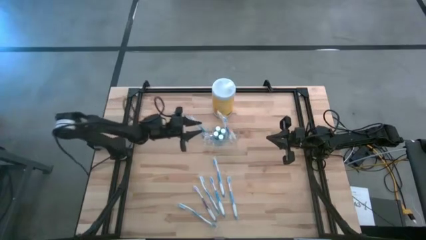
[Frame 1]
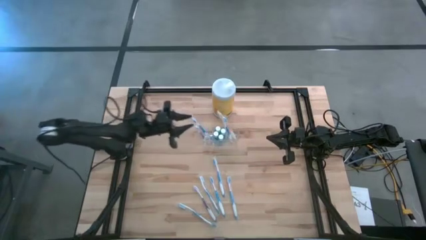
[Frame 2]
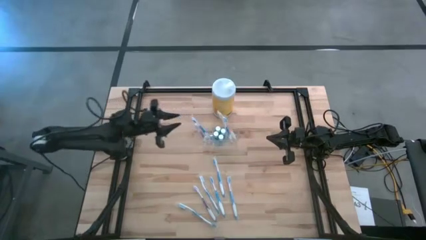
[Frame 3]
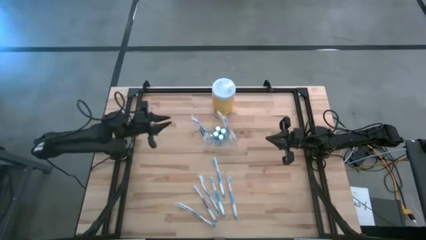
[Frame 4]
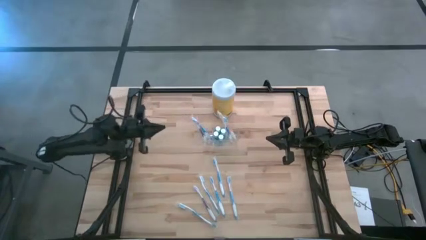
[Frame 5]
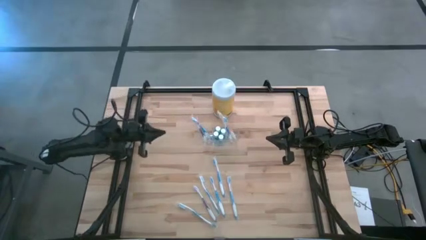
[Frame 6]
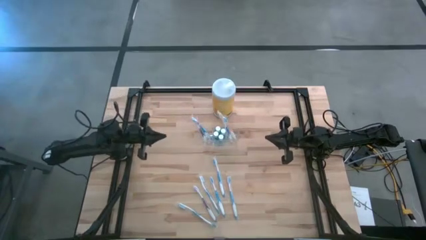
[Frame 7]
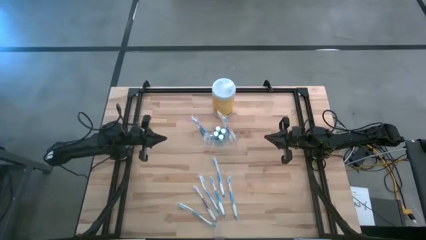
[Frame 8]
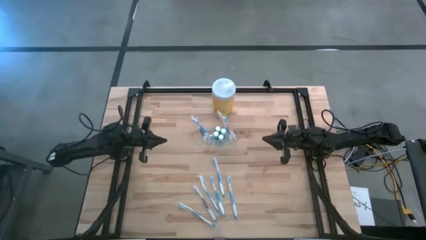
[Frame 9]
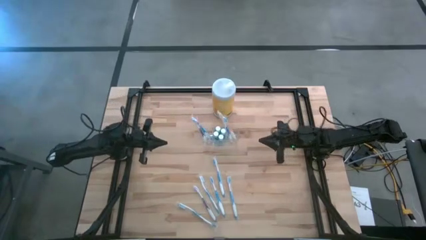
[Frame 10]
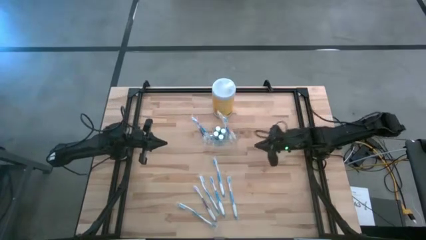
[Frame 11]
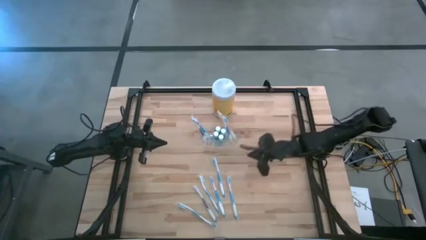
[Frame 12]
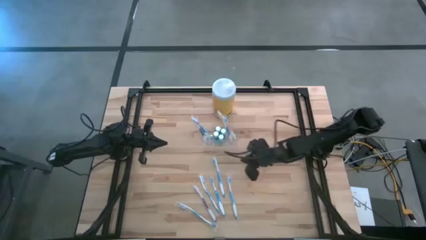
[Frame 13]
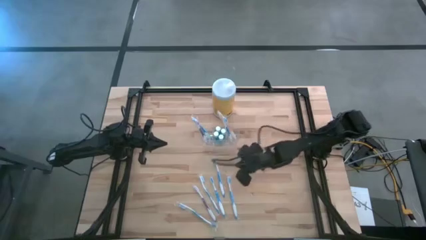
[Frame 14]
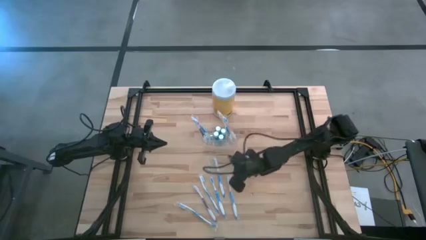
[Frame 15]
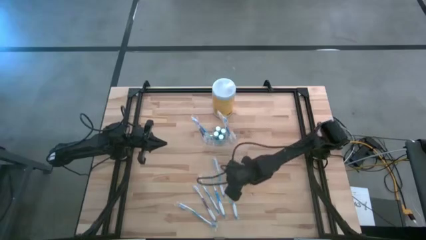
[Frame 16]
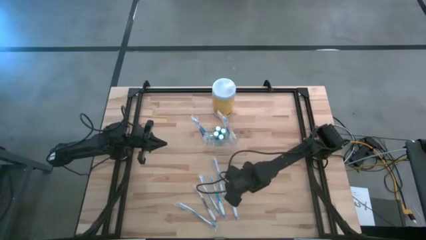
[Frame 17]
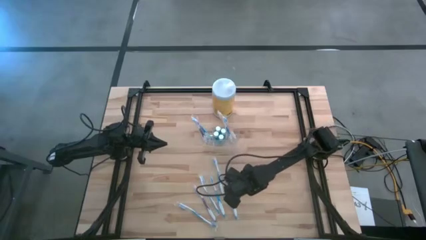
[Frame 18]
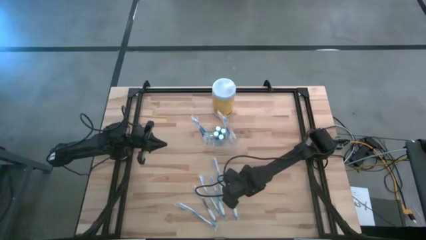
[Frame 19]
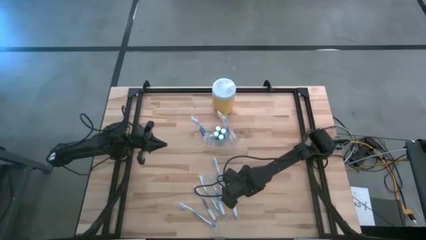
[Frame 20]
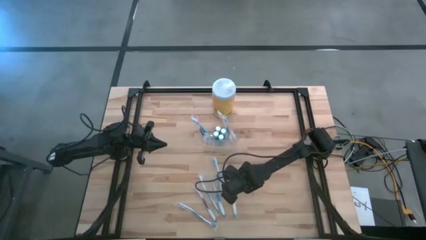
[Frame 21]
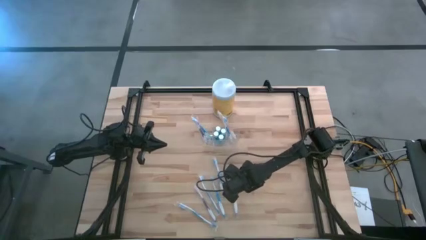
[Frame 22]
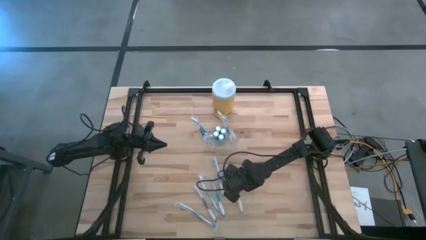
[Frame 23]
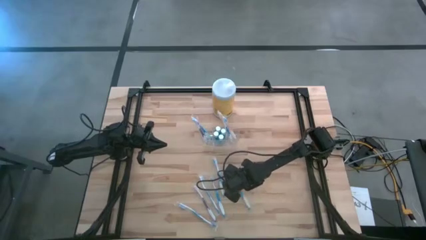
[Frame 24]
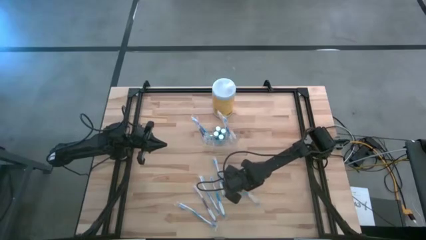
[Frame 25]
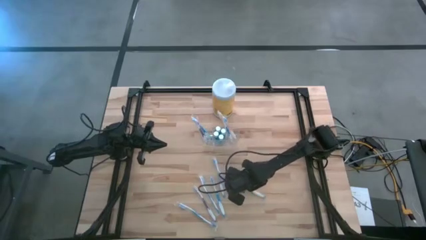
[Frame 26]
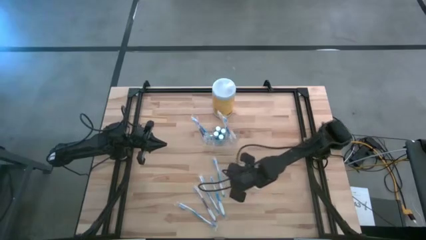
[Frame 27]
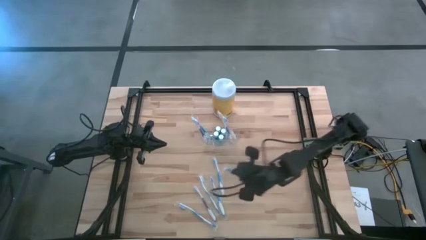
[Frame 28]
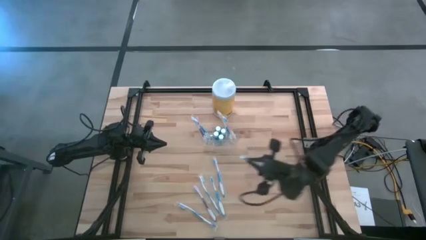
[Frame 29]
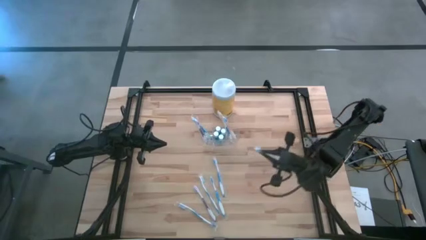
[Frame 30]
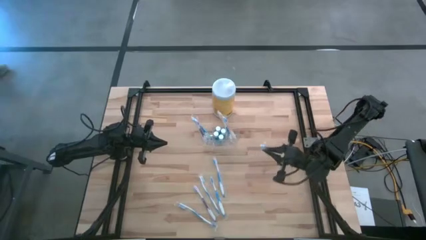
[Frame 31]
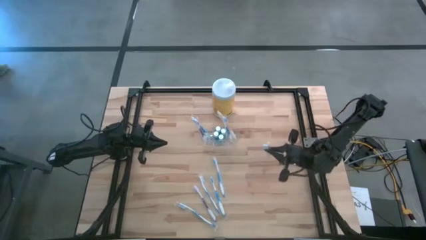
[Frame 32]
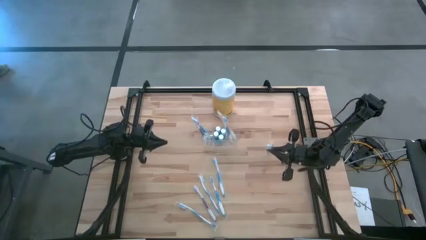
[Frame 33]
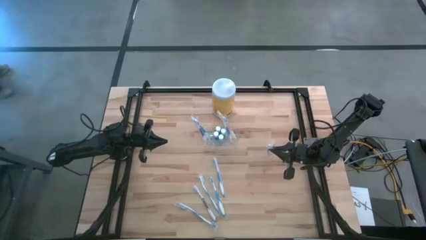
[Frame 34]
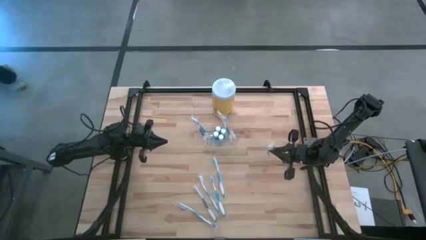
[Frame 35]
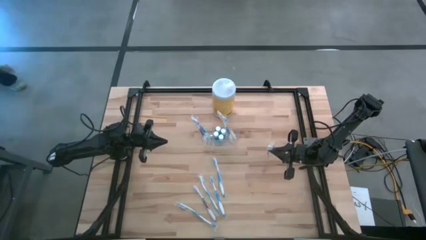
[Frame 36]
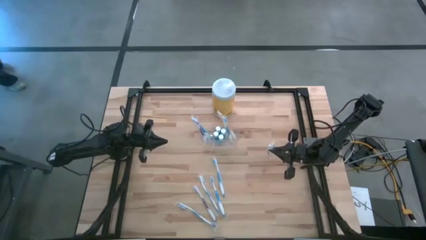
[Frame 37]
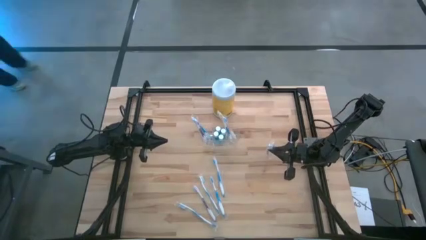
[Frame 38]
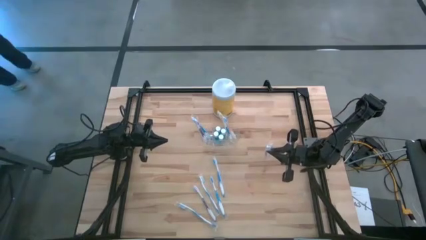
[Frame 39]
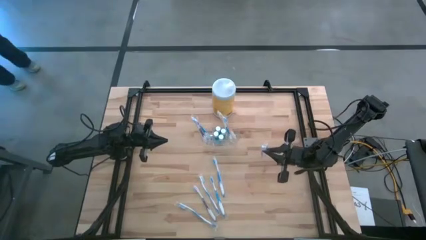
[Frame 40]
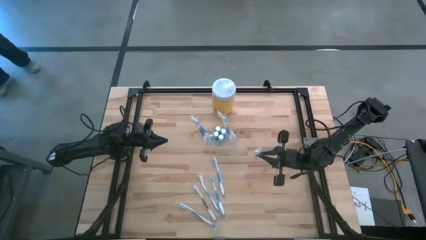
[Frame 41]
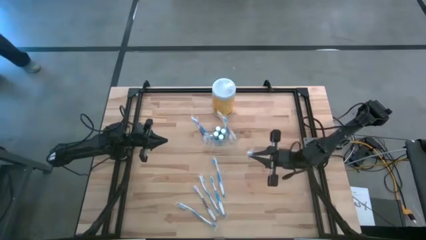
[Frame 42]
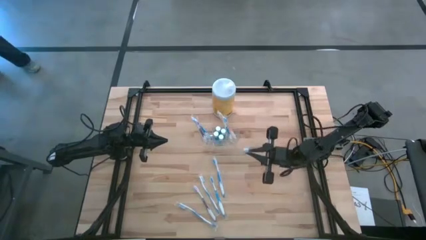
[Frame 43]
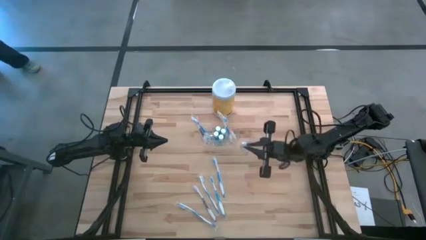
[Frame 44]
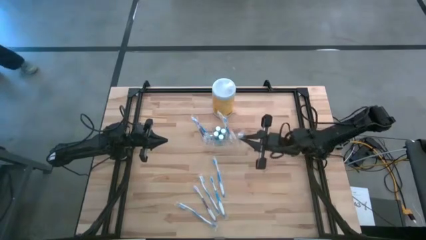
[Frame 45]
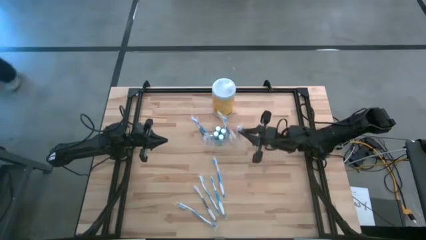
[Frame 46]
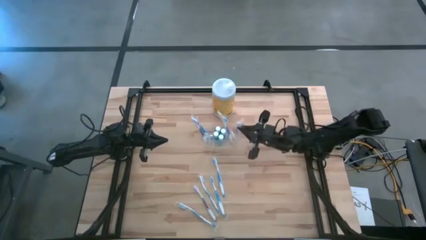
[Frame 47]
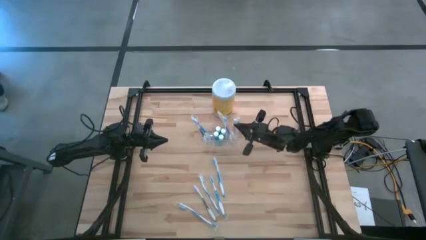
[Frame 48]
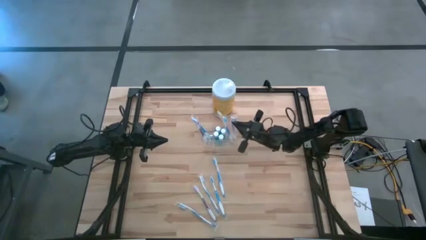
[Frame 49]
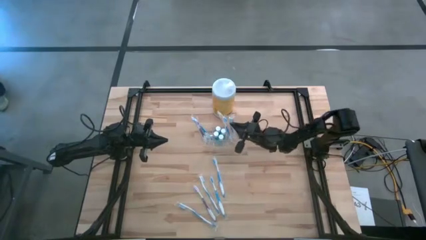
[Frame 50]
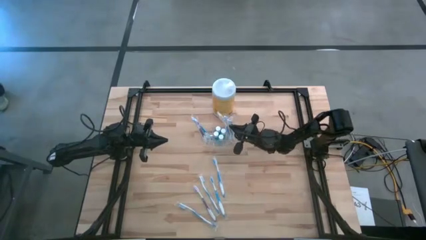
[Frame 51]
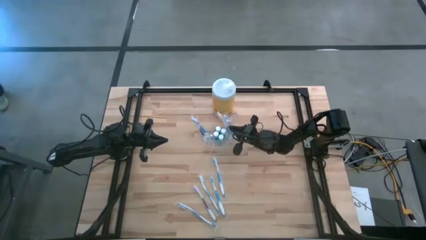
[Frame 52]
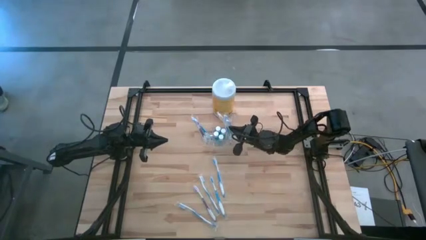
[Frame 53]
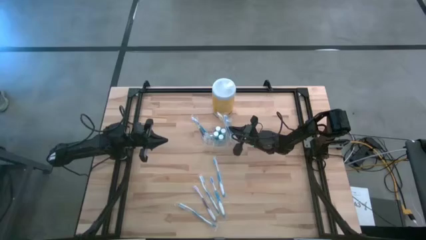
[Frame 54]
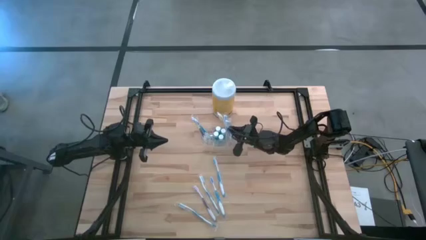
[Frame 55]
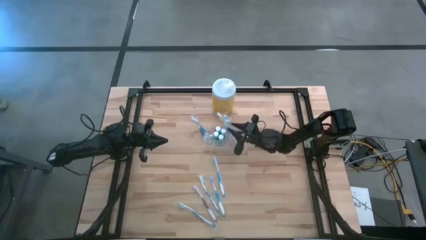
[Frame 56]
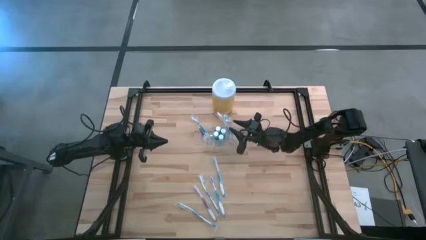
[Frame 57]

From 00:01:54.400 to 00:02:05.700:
Task: Pick & Place toothbrushing station
Put the blue toothbrush into the transparent organizer

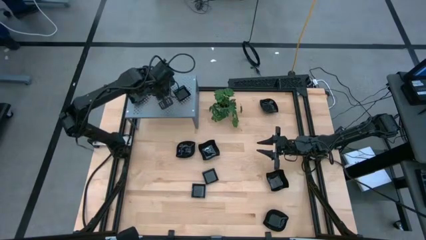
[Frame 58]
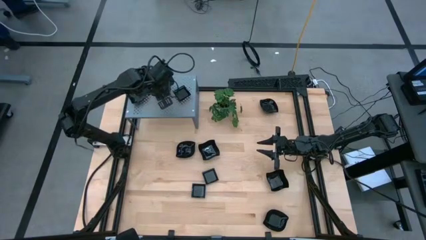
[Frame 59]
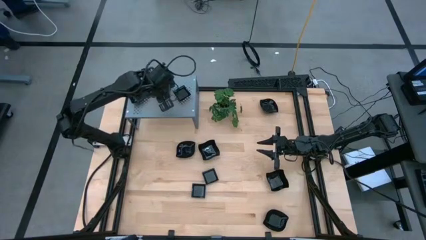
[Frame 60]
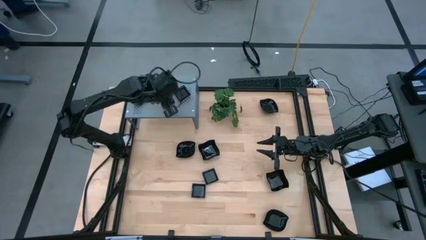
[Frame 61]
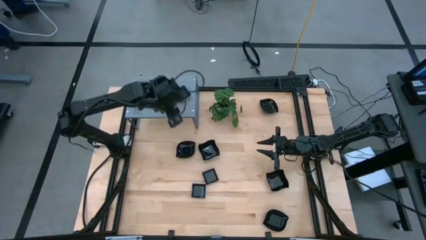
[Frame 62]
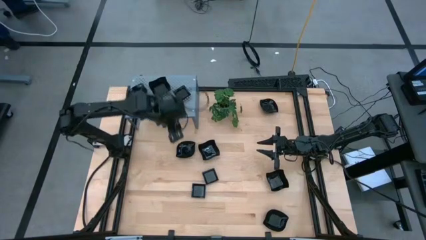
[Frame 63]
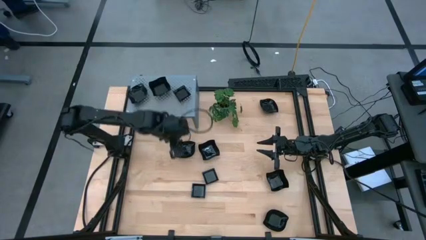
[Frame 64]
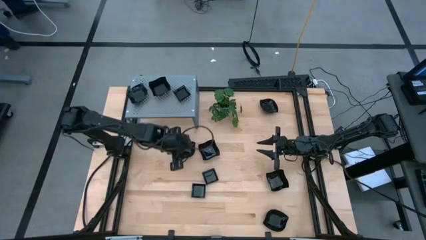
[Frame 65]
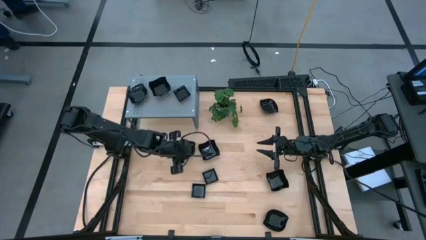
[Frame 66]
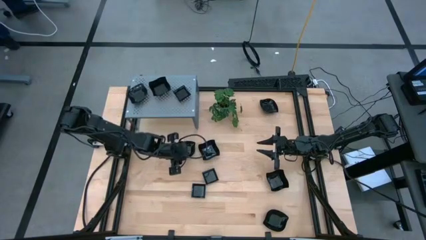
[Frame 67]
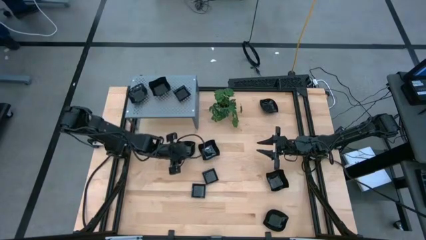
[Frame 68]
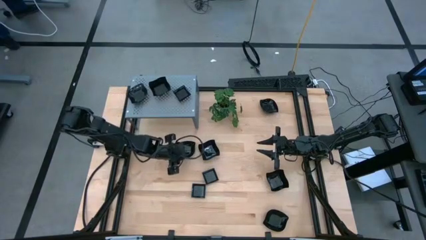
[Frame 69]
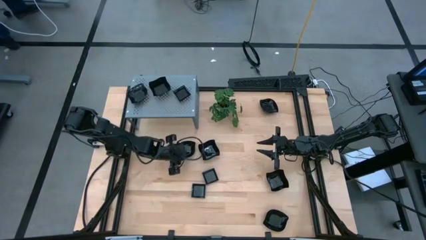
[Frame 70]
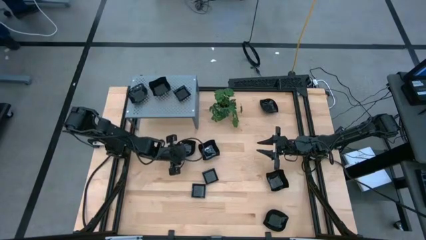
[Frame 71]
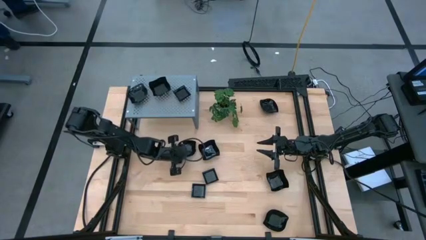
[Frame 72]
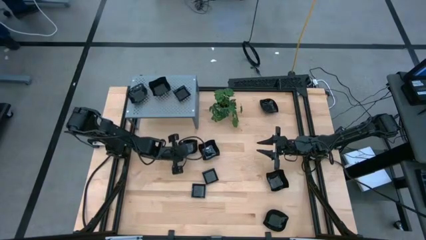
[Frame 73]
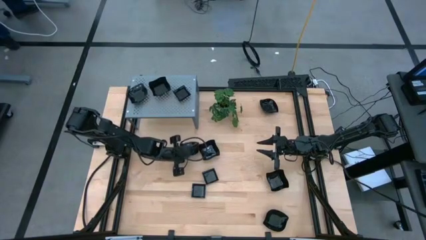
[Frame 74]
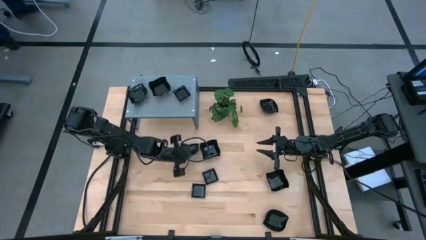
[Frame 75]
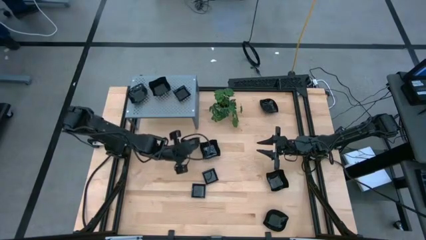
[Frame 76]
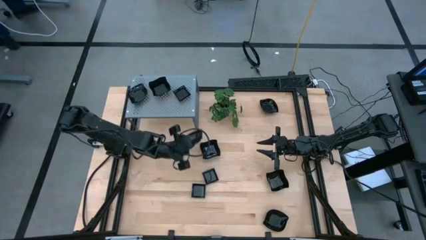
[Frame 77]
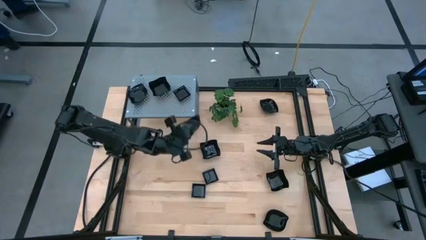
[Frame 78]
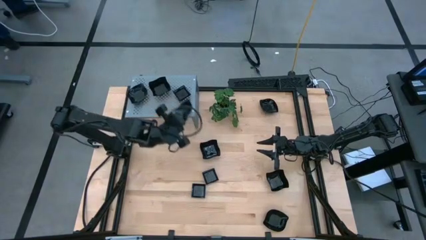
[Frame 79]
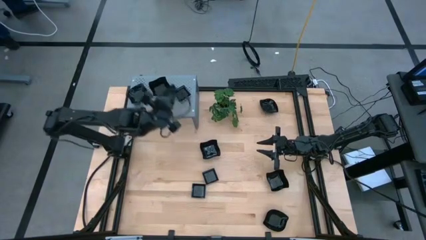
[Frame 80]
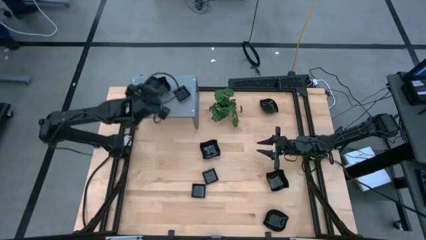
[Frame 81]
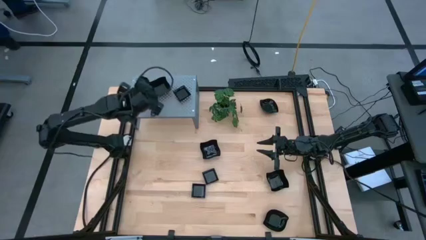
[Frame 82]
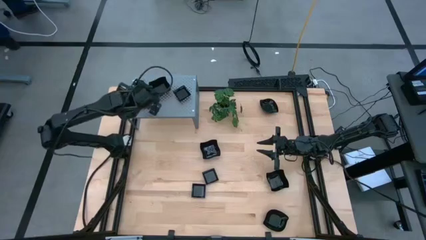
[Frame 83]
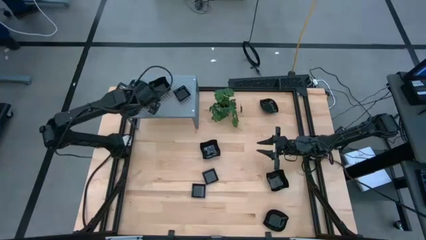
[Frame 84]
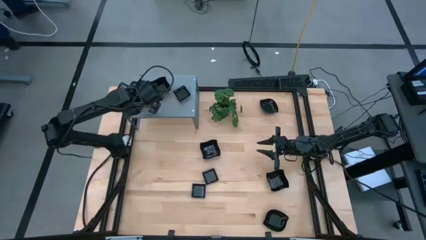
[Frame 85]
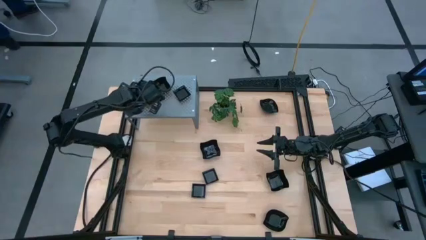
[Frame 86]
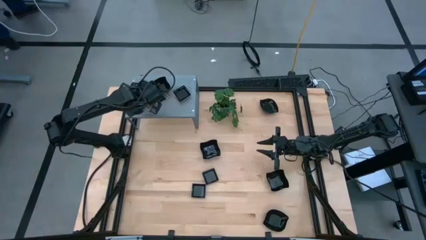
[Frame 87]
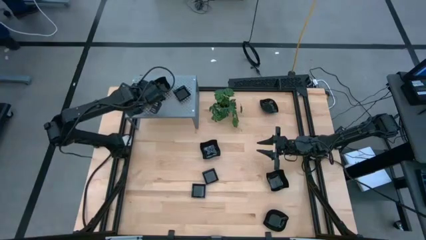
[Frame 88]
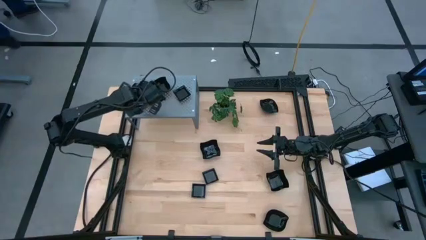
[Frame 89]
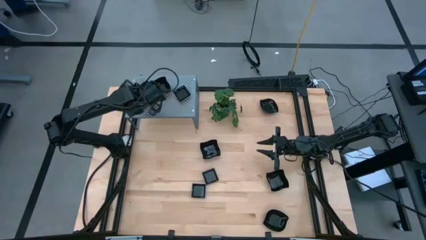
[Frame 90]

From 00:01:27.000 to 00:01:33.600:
Task: Pick & Place Mini shaped plates
Stack the black leaf plate on top of the black leaf plate on the shelf
